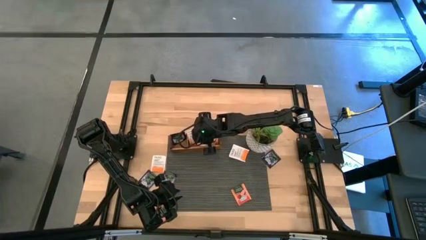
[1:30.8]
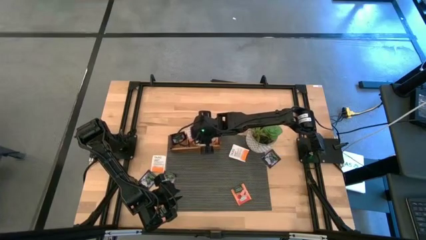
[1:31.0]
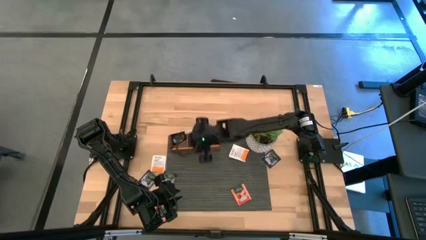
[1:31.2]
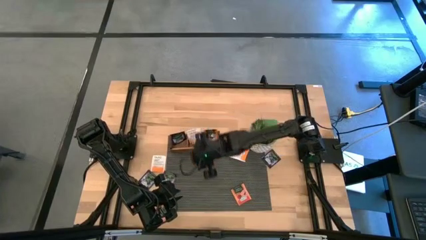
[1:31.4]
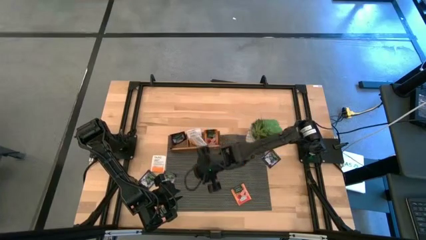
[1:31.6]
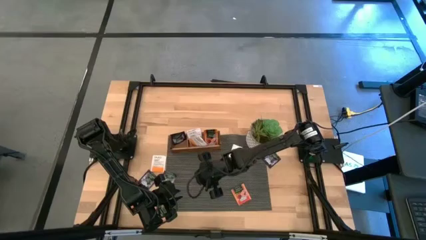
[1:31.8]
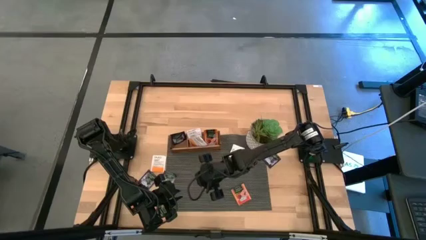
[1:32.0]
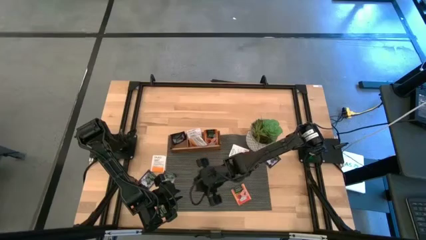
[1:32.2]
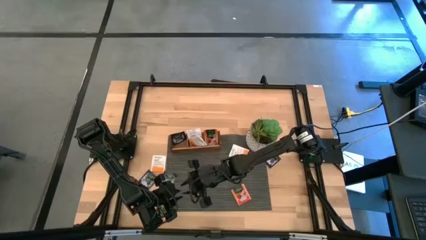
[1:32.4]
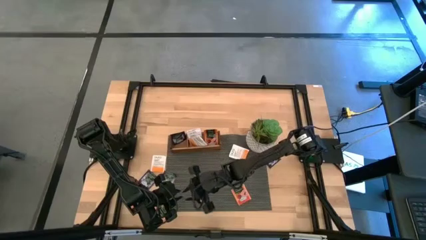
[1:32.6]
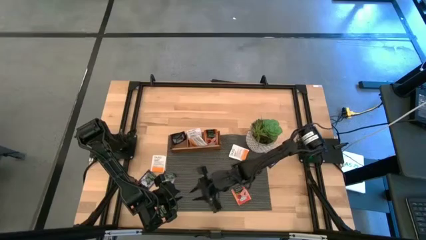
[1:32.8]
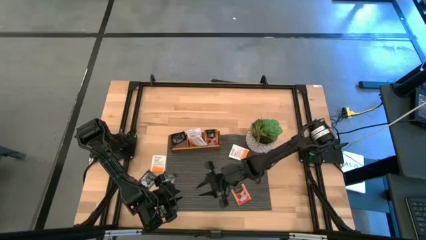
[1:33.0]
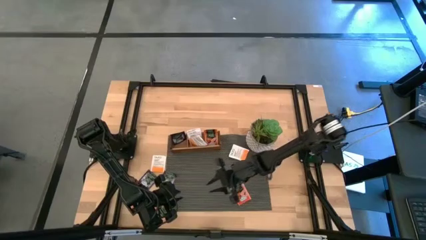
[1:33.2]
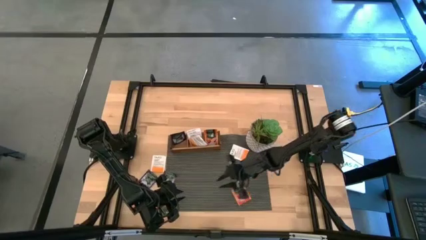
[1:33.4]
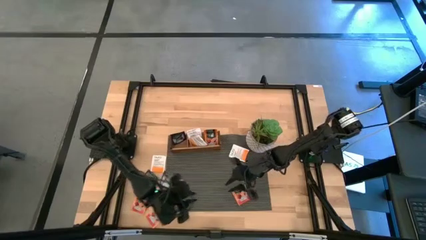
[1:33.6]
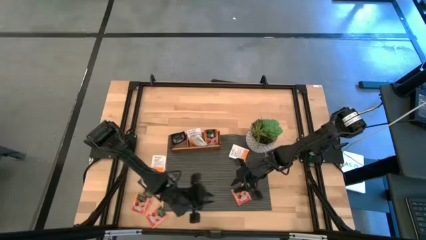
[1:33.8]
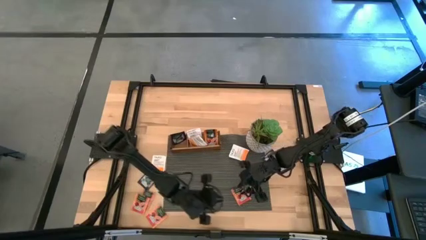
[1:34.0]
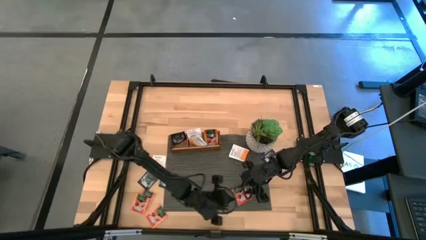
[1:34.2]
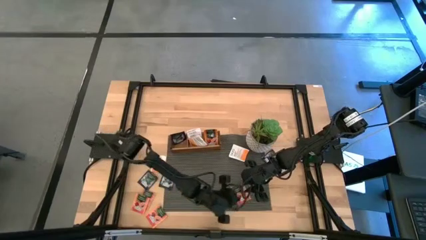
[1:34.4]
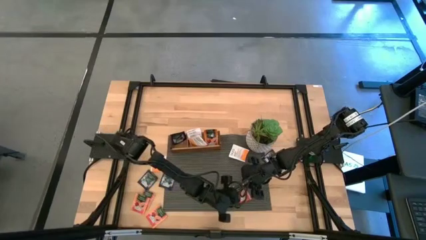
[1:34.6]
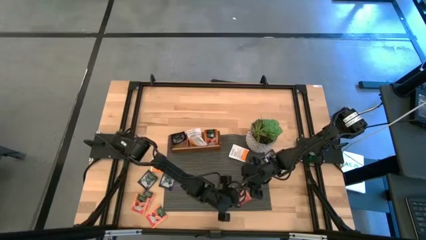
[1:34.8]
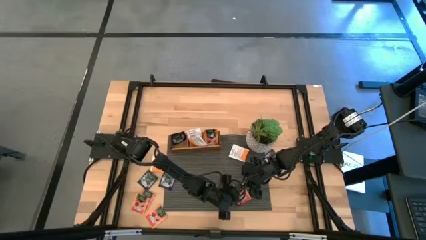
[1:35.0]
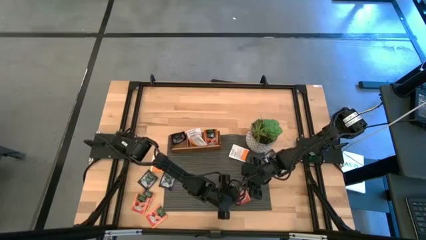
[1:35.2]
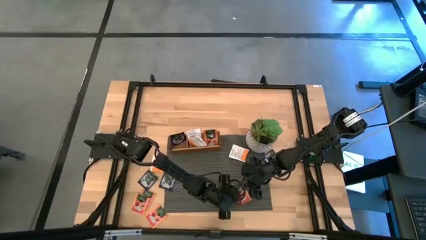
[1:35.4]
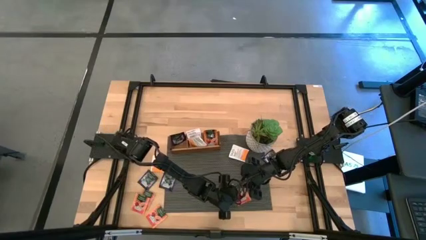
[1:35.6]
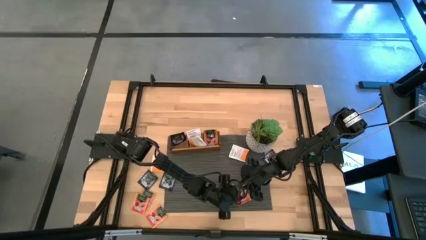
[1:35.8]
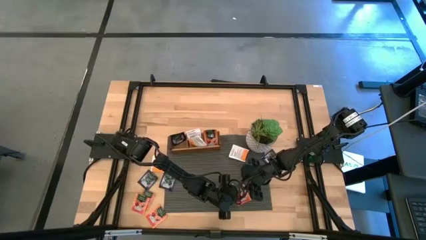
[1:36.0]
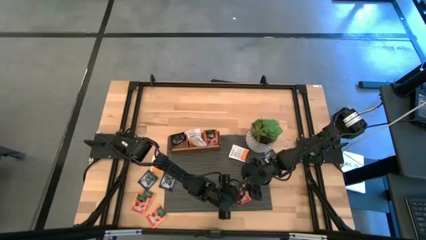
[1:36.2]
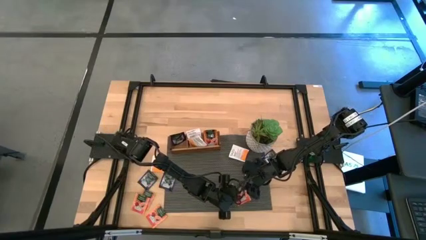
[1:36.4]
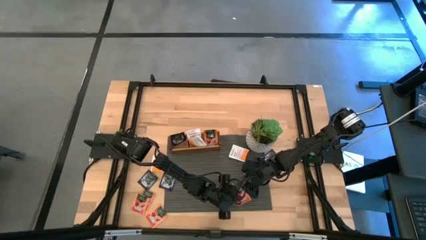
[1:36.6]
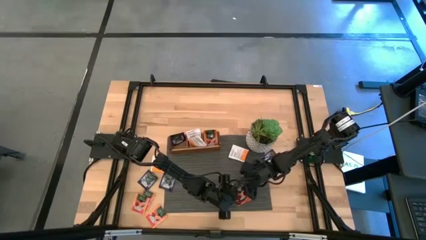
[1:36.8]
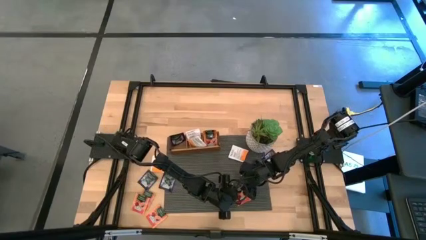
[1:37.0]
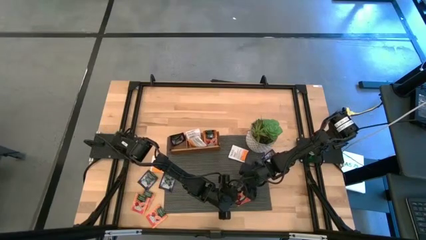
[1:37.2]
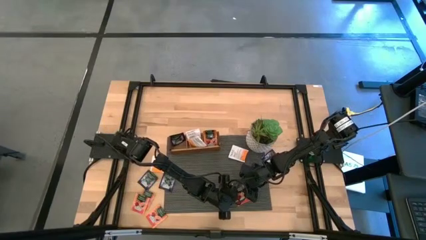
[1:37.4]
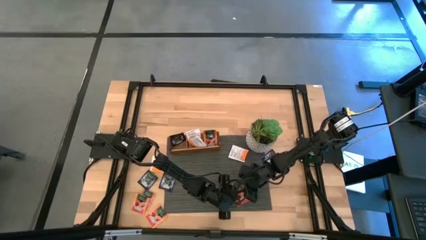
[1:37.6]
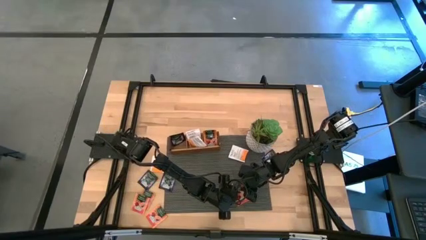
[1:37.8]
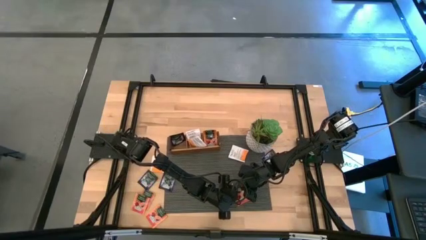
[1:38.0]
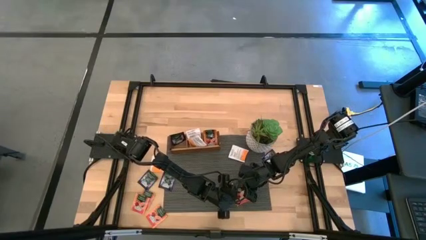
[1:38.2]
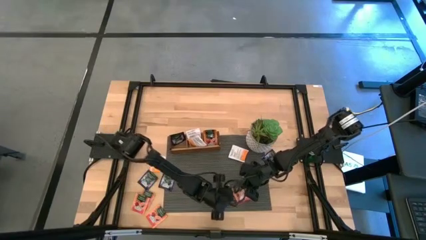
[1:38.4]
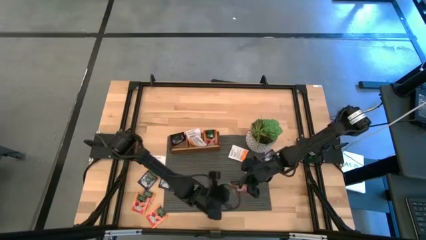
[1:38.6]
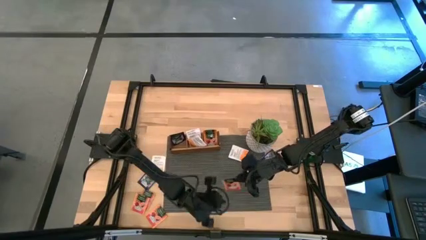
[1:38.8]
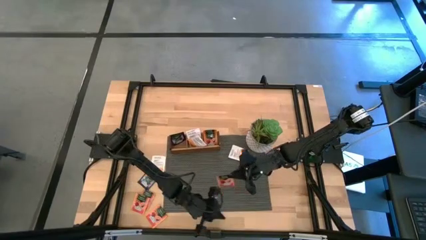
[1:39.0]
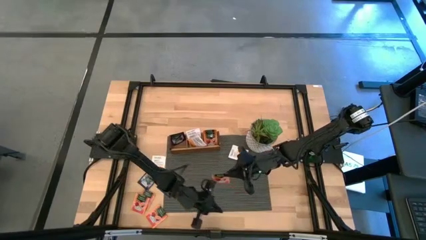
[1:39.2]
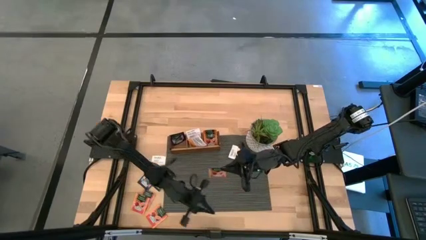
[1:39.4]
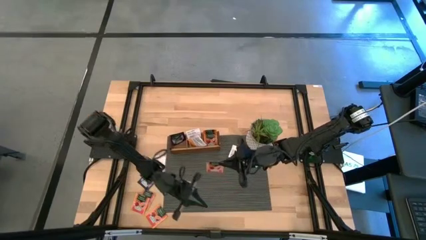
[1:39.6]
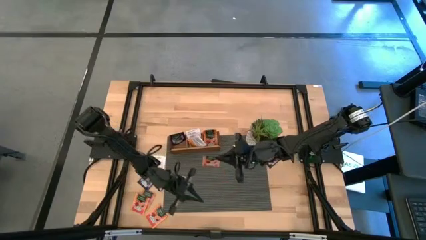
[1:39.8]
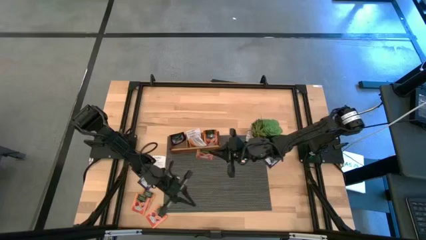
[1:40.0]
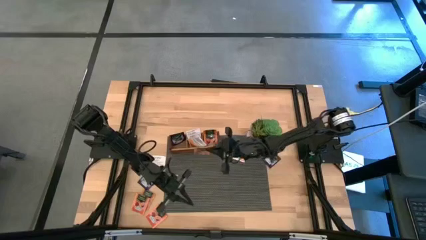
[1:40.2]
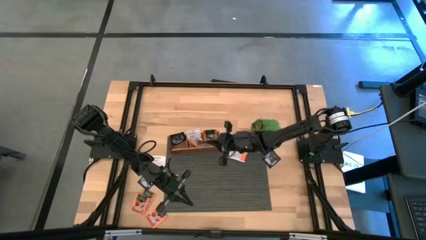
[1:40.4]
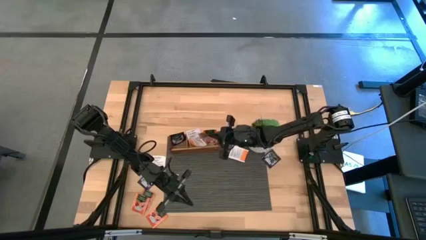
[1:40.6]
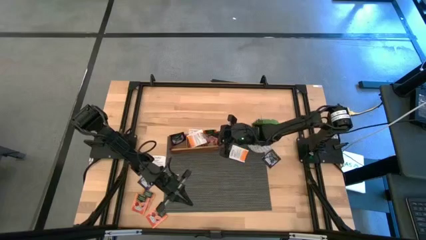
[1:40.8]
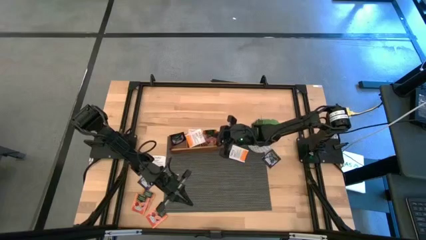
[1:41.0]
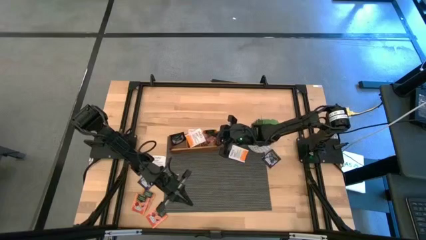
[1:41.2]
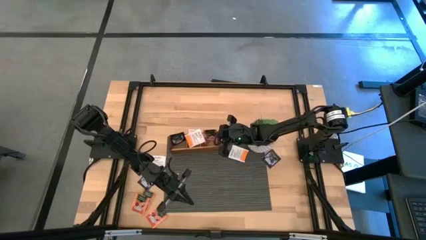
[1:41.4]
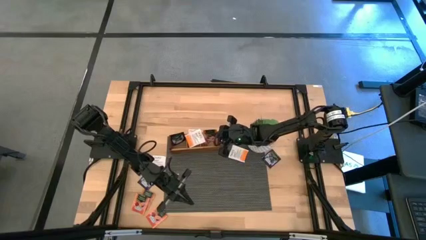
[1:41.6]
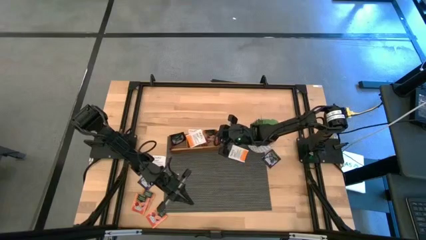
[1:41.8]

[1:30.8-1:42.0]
Task: Pick & Place Tea
Put the orange tea bag to the right section of the wooden organizer

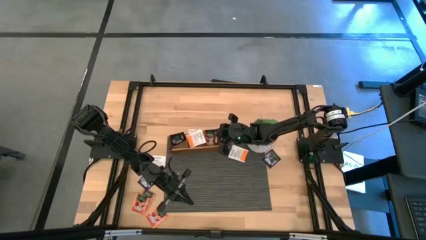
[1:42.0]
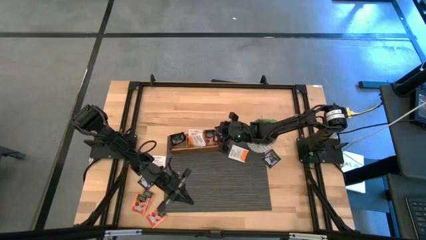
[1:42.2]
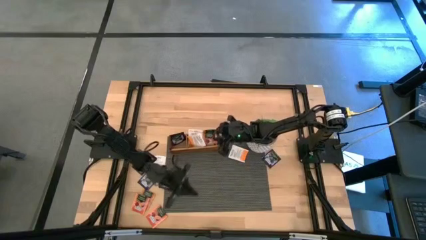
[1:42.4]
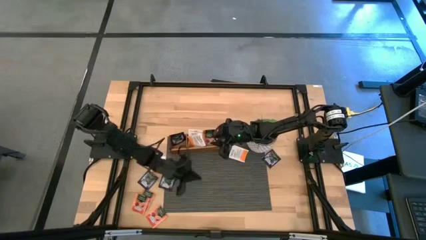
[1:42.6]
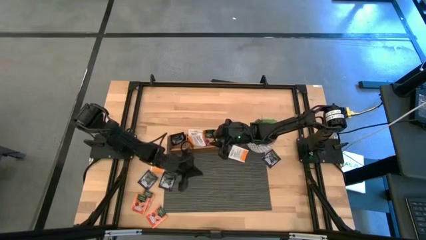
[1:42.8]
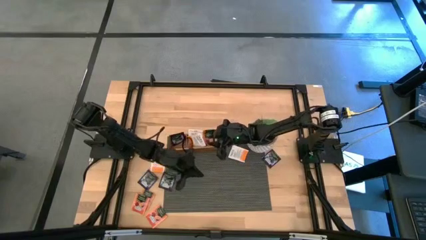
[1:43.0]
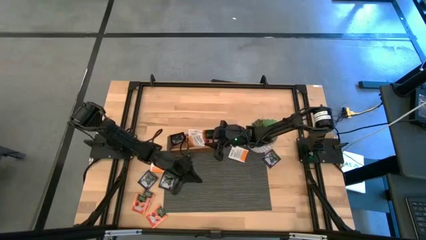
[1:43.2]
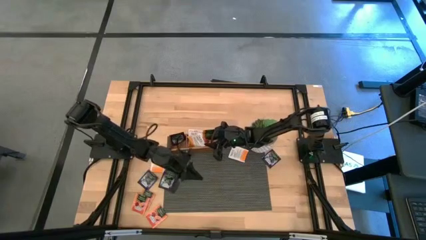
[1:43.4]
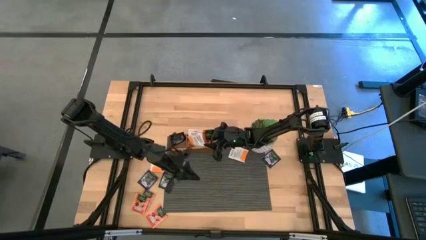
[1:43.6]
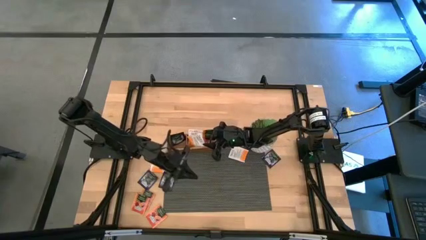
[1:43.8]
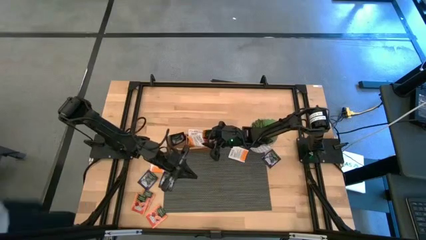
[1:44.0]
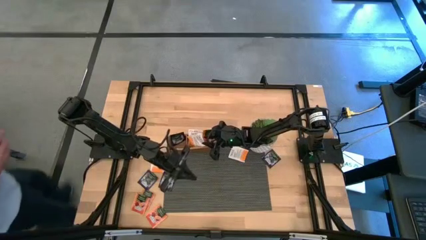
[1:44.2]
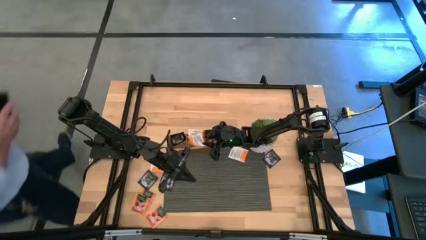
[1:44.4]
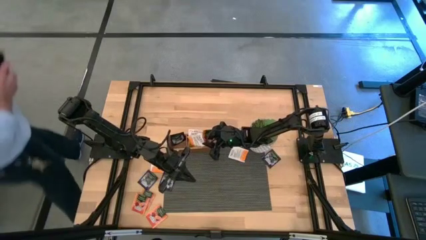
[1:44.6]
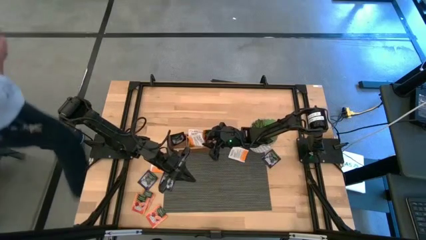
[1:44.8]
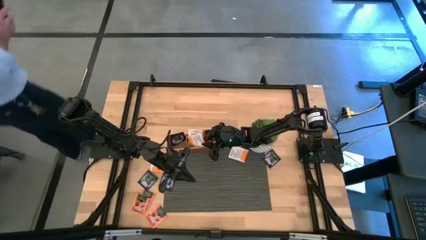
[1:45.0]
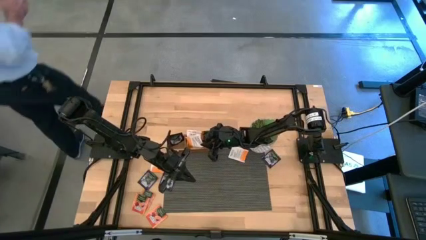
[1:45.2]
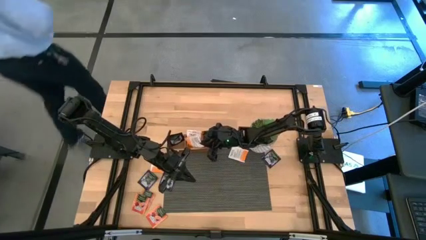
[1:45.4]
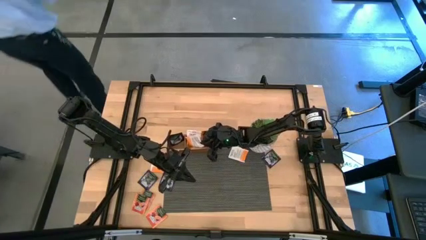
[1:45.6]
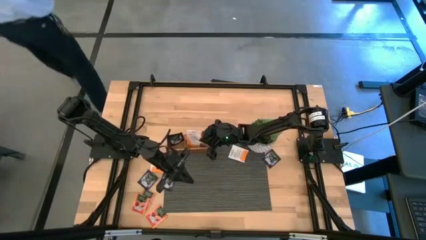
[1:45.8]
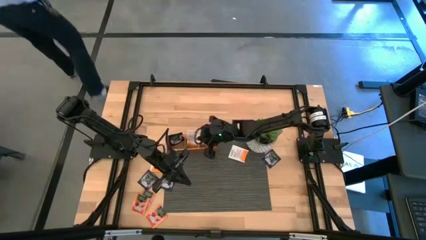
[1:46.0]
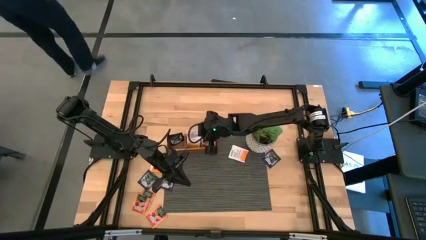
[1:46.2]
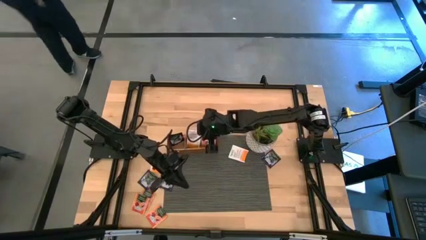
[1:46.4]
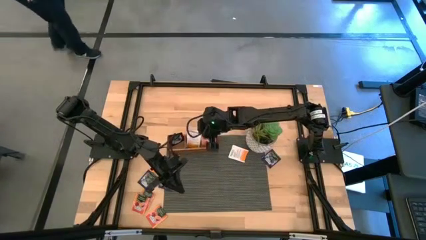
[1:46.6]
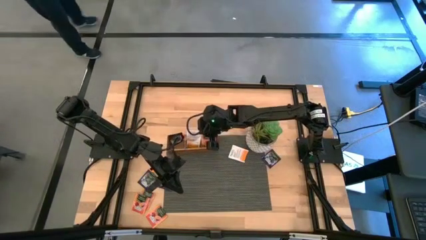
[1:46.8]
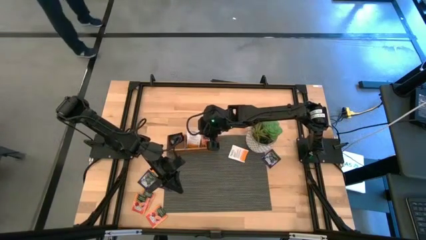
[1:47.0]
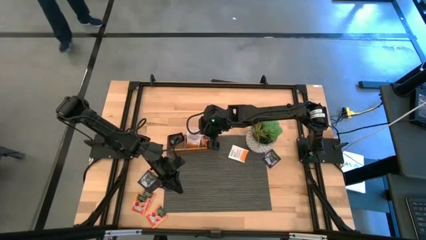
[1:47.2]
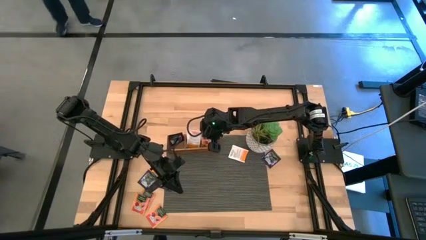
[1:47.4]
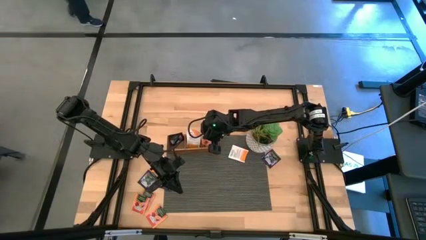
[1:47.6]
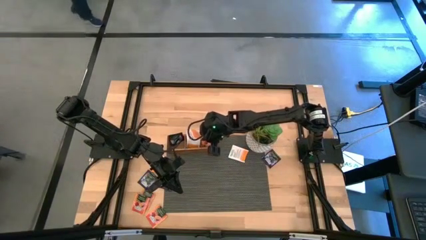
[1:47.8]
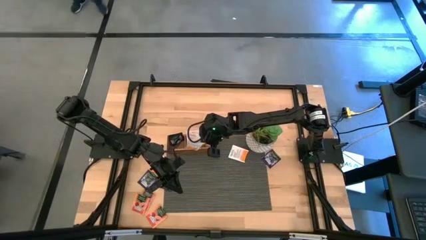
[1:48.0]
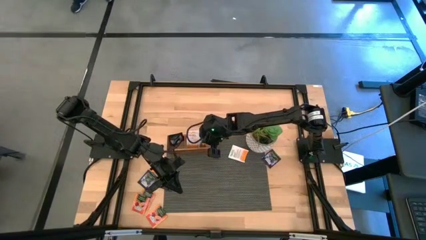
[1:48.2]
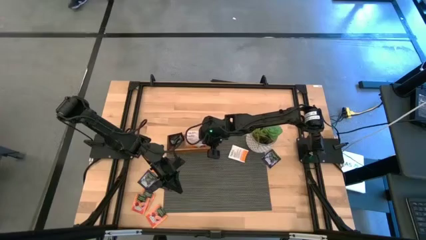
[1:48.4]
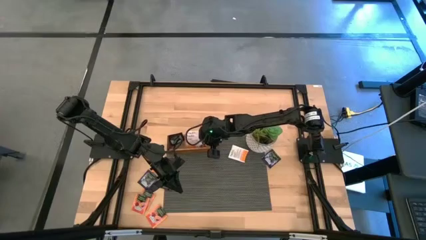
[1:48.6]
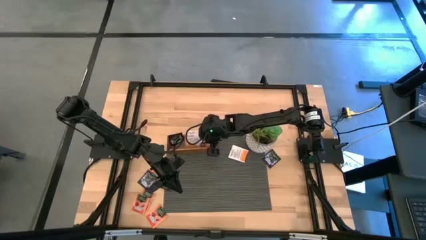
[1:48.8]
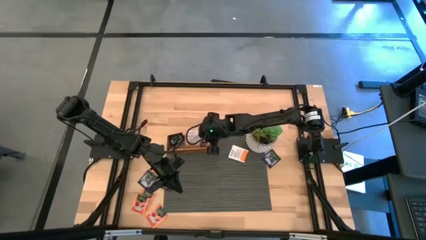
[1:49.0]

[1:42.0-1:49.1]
Adjust the white tea bag in the middle section of the wooden organizer
